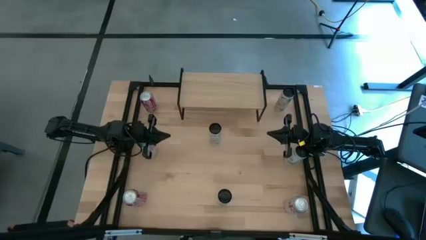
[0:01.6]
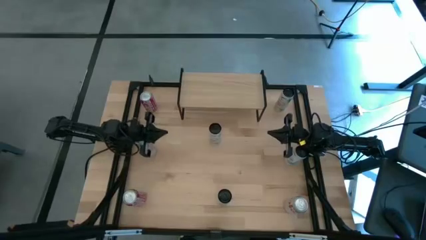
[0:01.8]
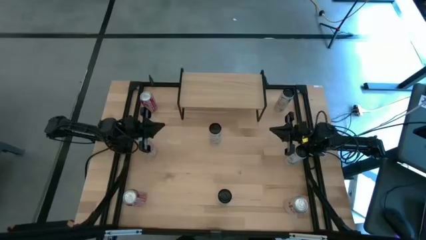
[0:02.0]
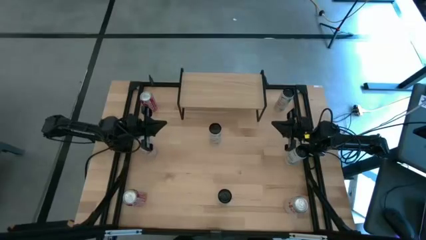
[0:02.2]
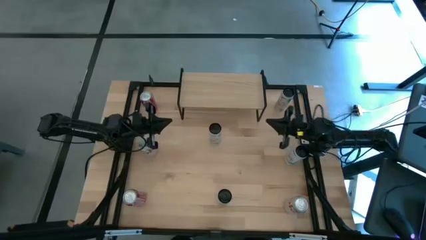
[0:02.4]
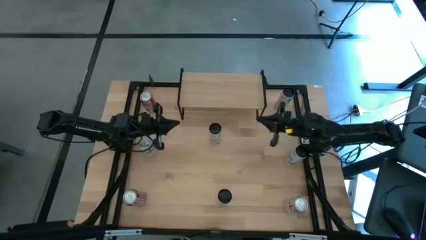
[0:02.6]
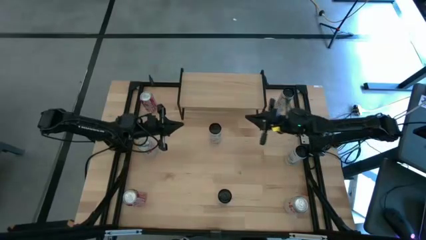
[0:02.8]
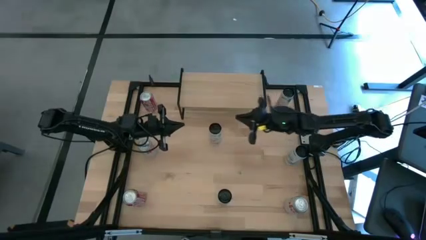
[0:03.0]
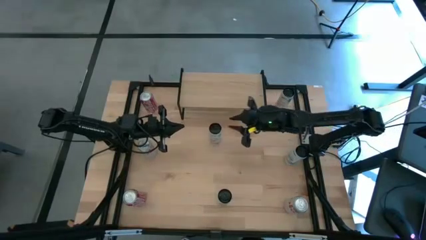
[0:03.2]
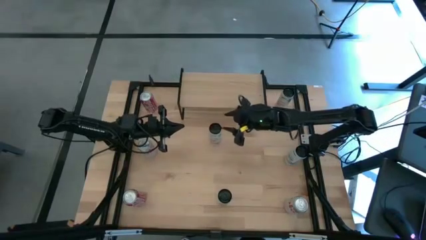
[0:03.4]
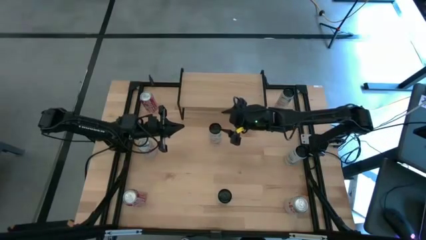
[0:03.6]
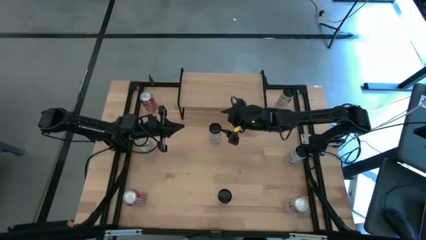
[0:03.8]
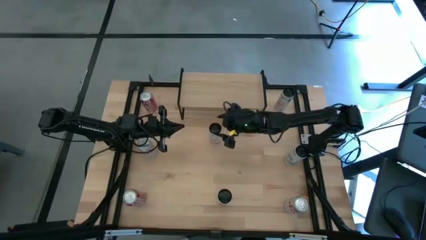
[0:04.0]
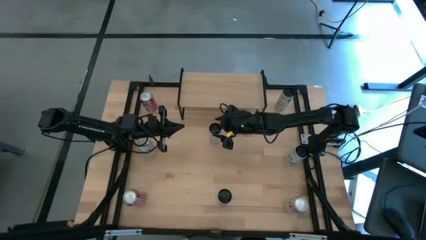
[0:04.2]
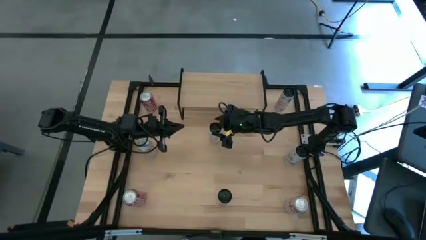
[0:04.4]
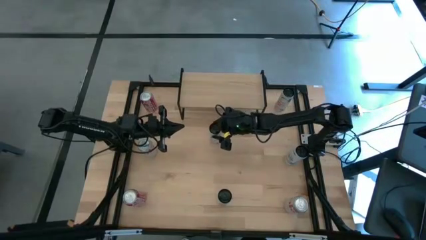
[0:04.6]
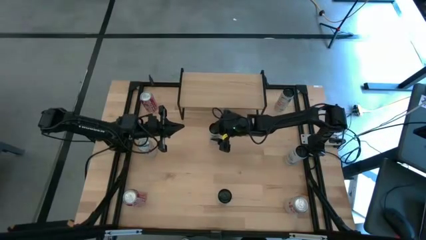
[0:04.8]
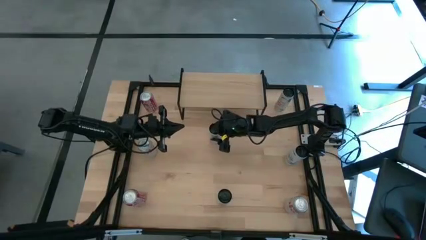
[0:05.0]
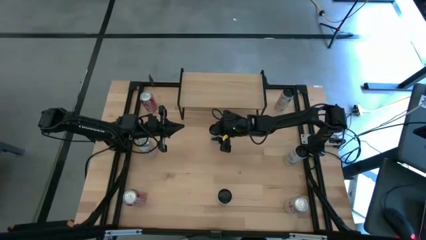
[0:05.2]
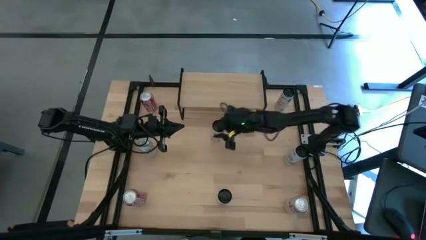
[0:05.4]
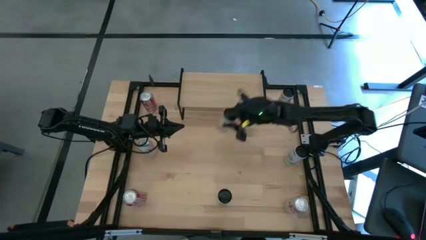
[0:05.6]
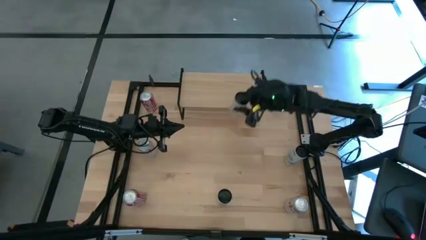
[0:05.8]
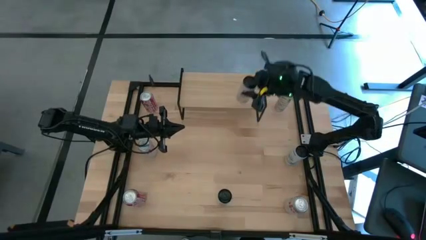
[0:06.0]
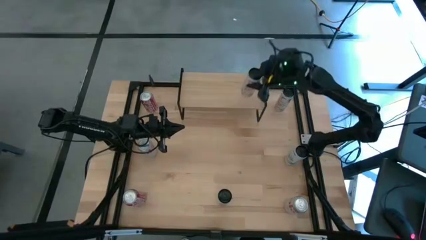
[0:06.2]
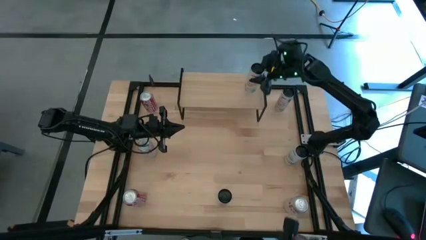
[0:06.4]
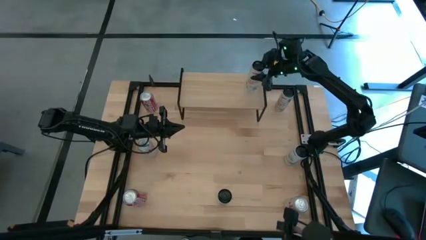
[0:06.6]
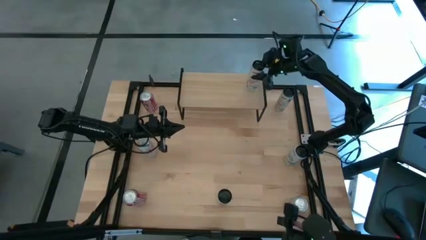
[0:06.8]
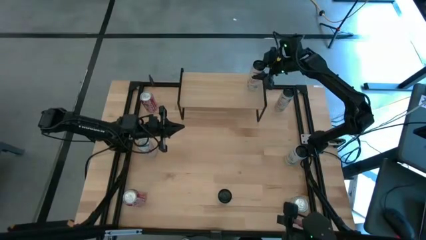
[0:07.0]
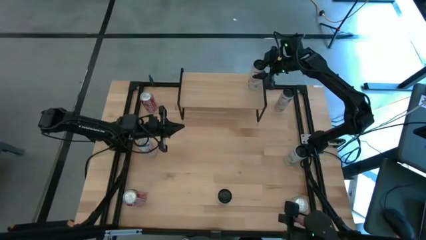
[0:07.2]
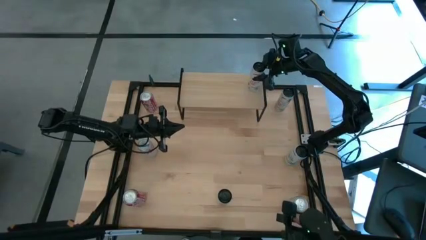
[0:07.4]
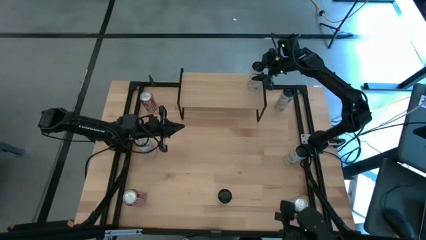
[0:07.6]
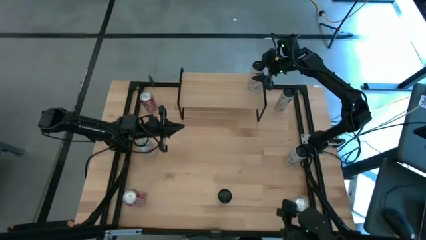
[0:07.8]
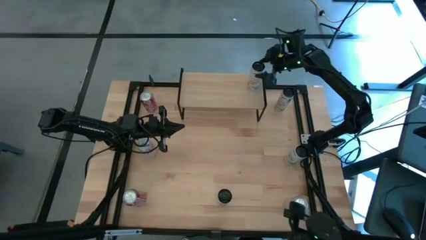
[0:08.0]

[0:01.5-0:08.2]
Task: Place canned beverage on shelf
Put the bottom white pink soda can on the shelf

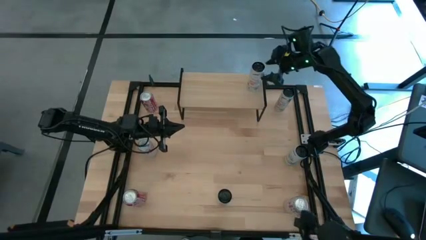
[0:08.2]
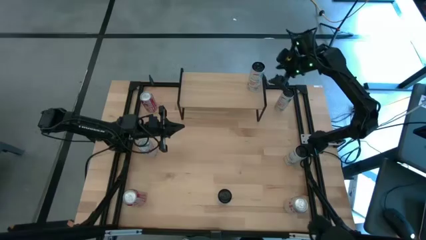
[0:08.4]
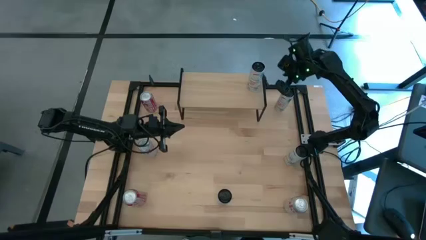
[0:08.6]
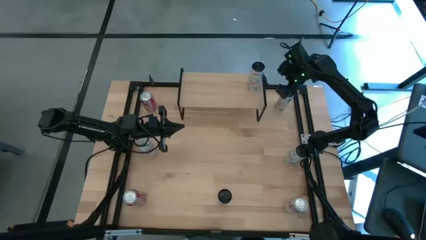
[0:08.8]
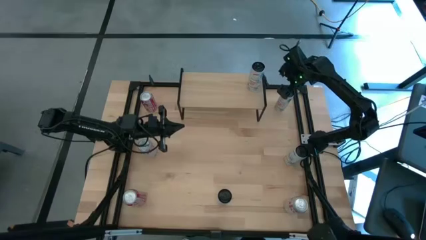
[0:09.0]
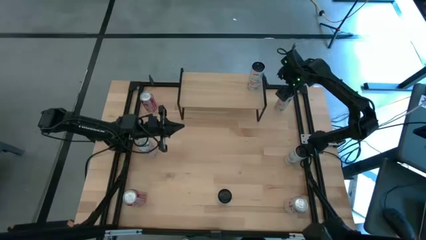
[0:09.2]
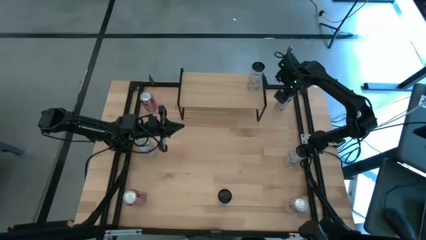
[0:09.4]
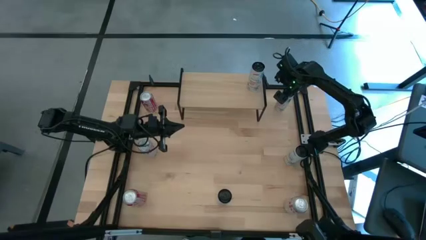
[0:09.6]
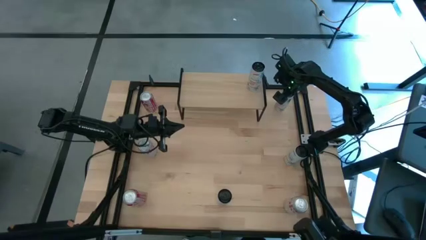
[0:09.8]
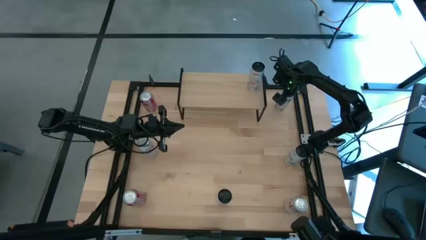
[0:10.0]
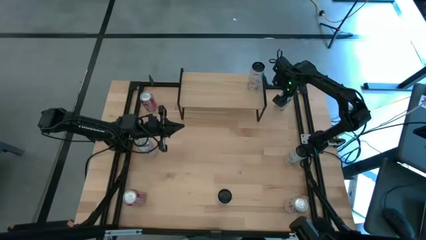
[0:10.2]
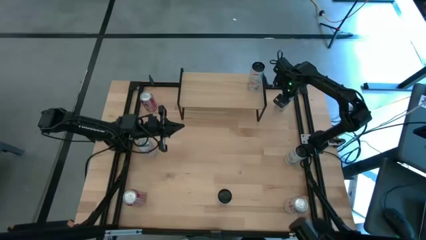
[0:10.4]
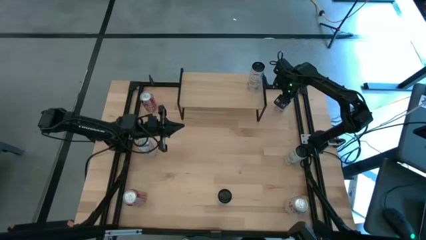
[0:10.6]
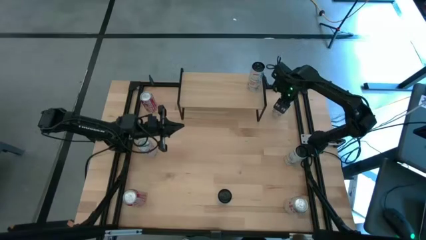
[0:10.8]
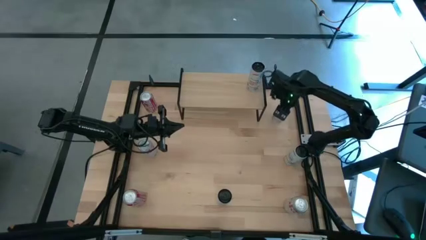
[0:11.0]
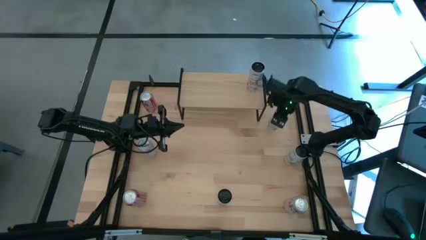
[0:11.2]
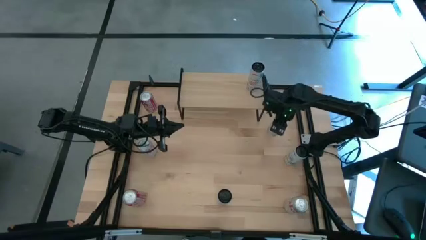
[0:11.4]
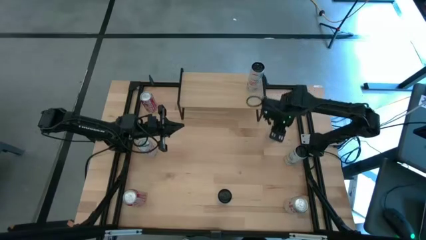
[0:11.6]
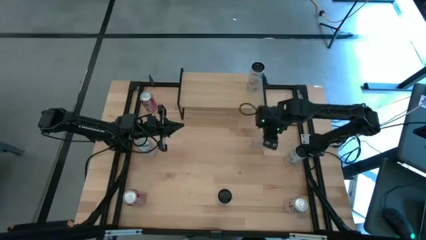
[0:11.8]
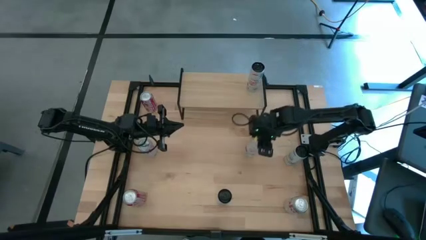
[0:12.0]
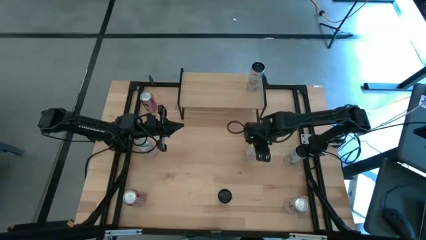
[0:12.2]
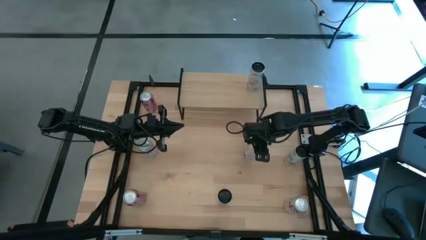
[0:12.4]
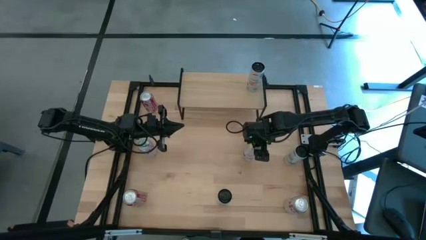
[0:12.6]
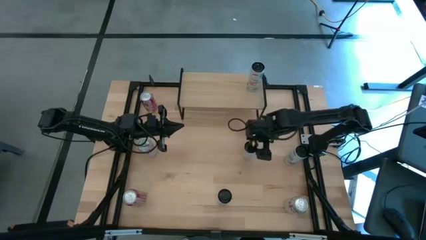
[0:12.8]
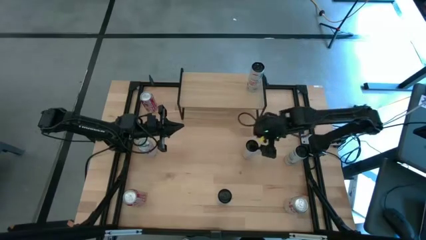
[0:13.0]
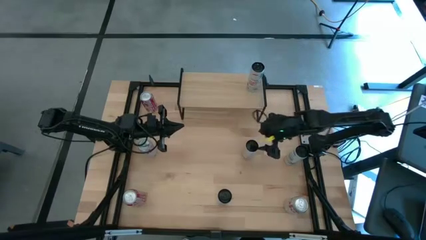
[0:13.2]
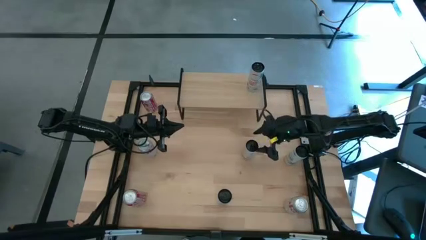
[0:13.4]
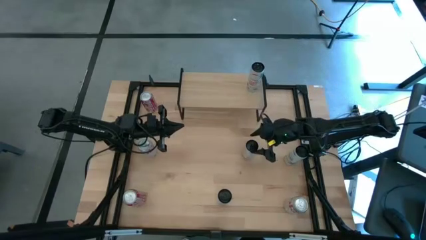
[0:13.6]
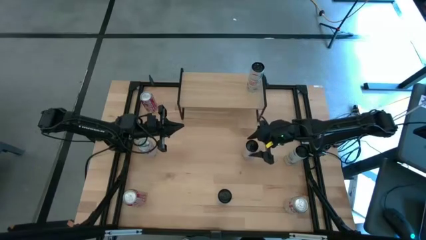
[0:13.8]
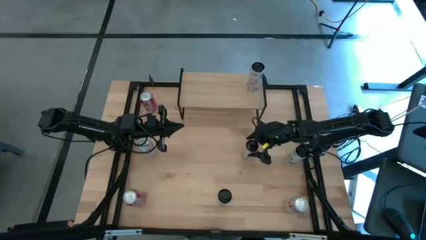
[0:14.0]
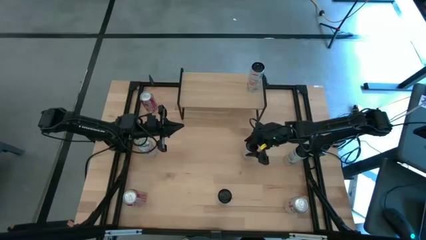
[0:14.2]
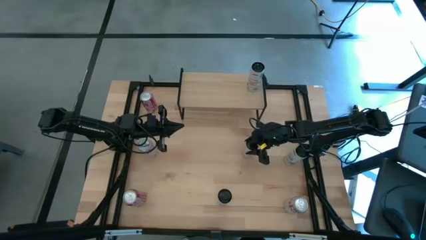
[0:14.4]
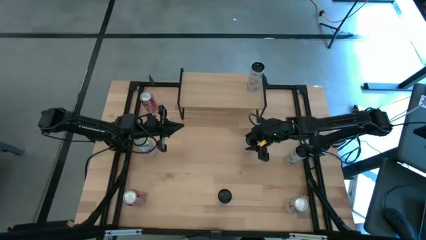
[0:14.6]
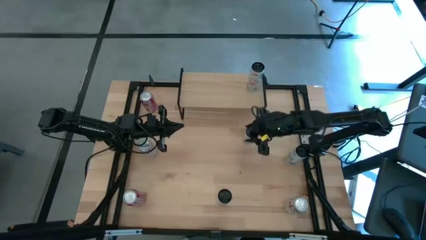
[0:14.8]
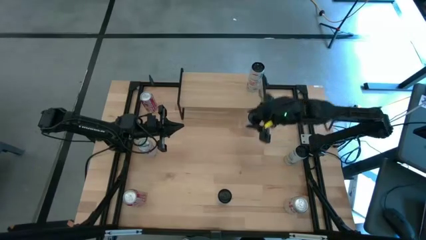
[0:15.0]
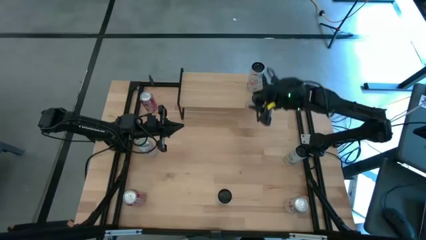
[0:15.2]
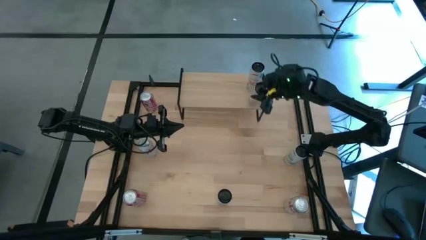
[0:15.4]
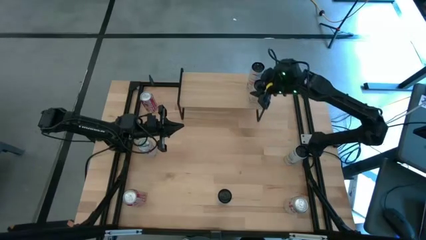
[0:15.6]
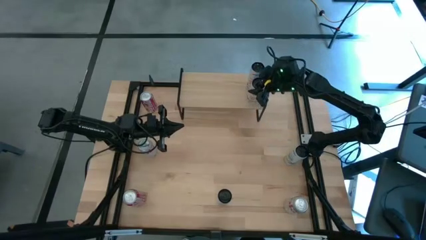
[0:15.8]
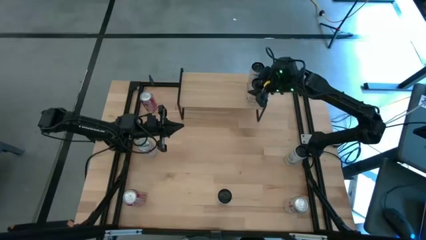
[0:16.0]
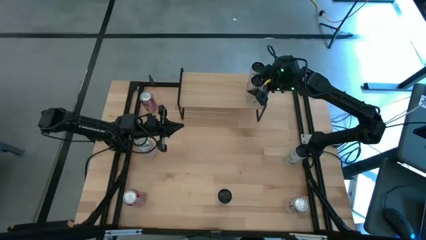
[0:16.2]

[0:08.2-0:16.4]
Put the white pink soda can on the shelf aligned with the other white pink soda can

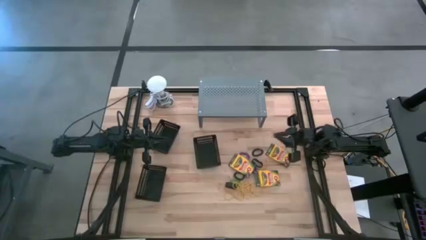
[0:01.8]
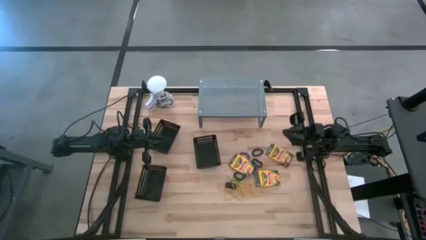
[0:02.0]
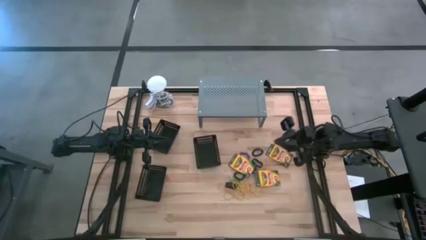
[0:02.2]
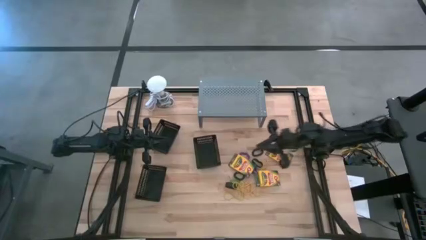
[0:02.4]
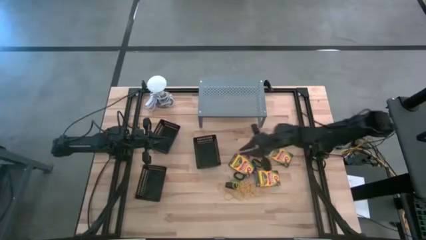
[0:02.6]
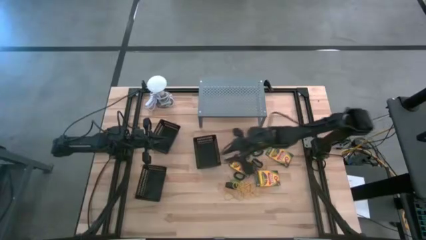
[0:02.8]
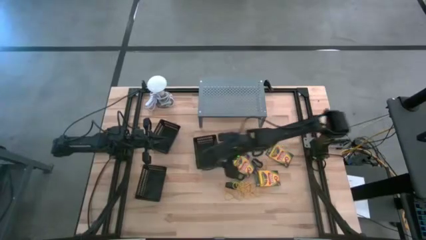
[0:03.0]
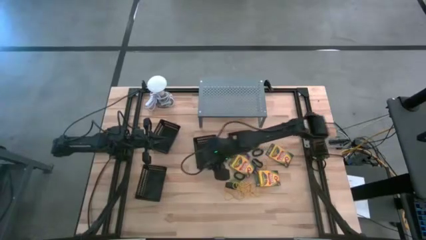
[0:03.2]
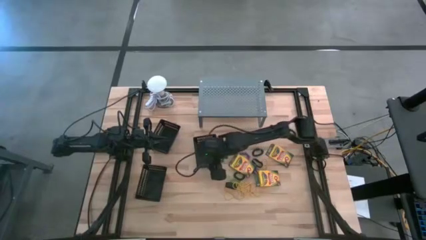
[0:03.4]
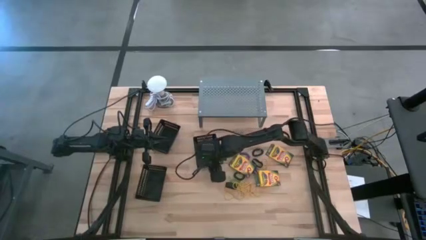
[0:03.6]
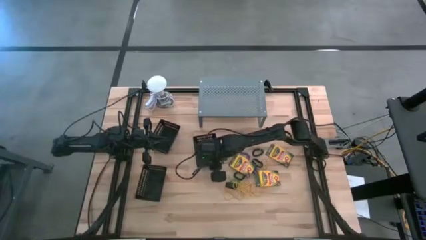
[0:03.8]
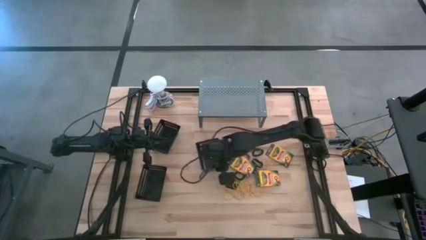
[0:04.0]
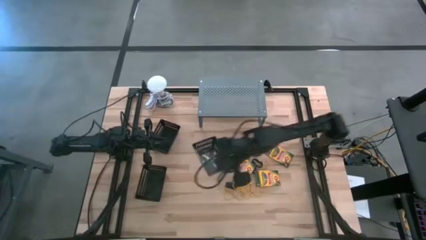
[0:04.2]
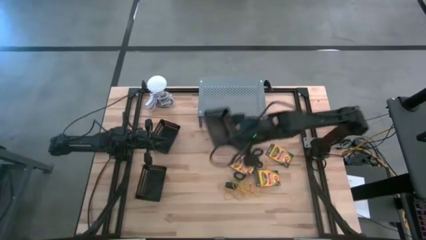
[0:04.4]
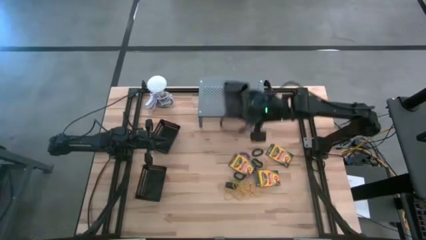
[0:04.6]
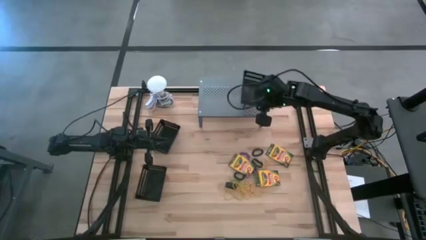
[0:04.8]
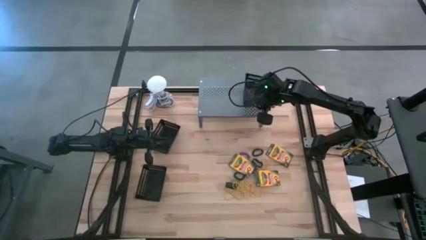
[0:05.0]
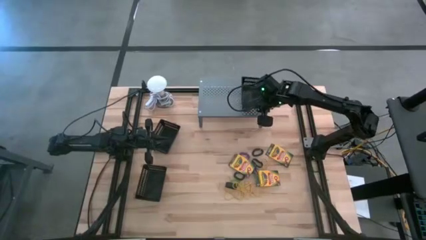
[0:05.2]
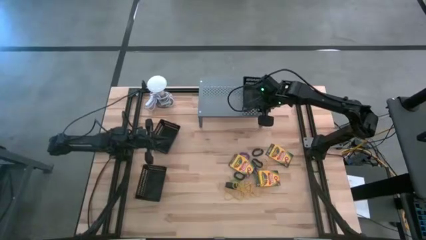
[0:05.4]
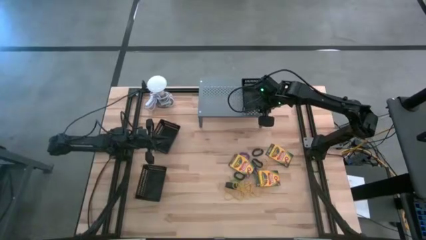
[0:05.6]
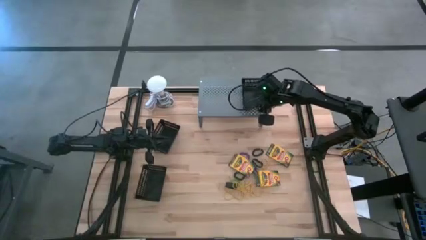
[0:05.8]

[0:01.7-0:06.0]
Task: Pick & Place Office Desk Supplies
Put the middle black bin on the shelf
